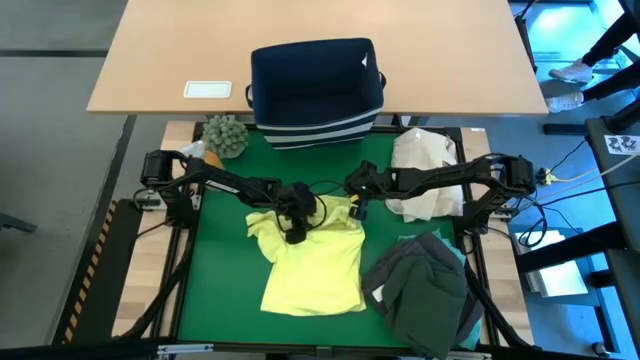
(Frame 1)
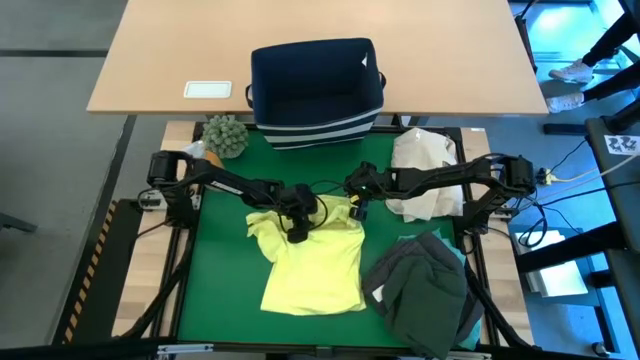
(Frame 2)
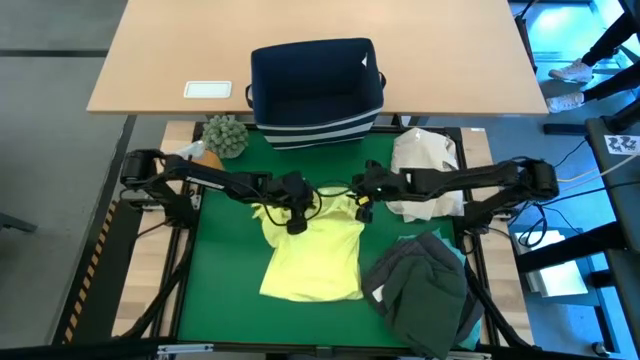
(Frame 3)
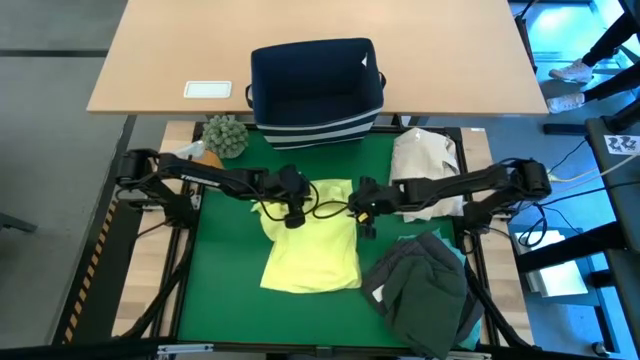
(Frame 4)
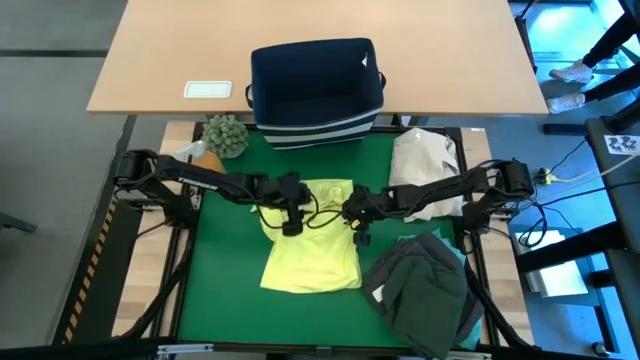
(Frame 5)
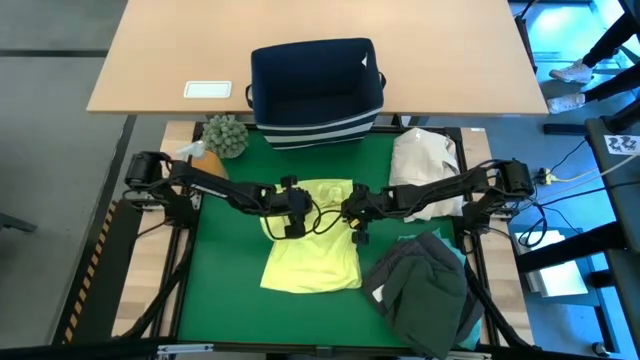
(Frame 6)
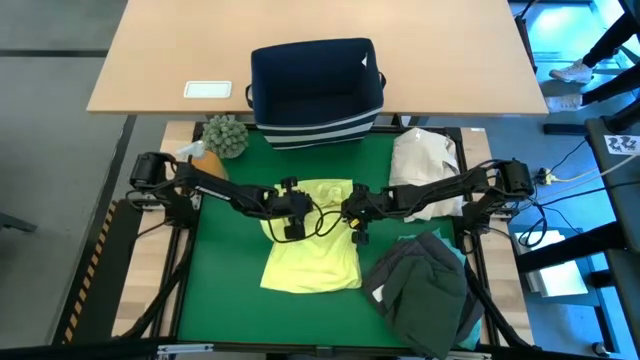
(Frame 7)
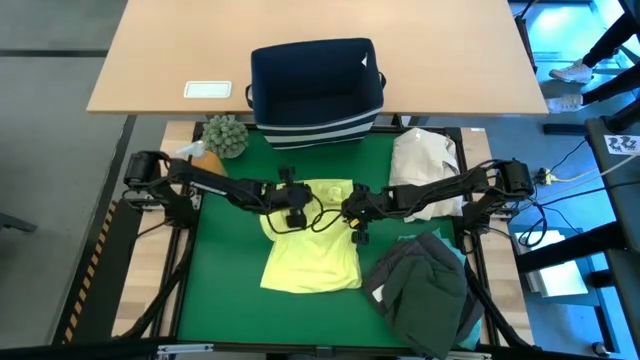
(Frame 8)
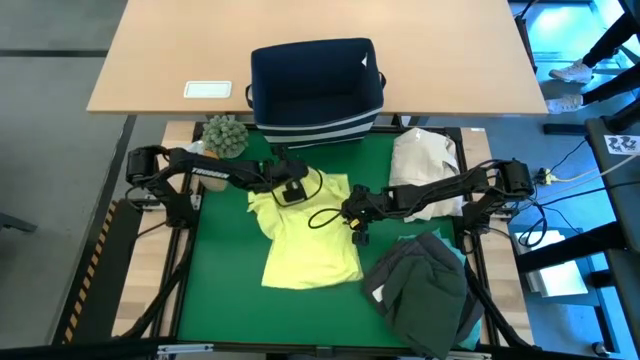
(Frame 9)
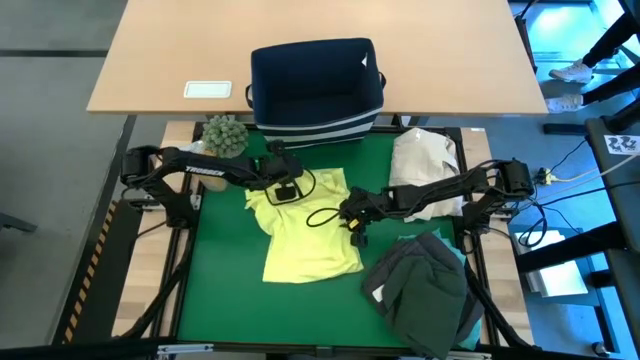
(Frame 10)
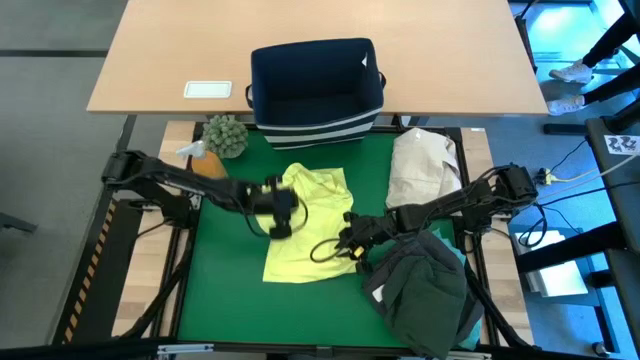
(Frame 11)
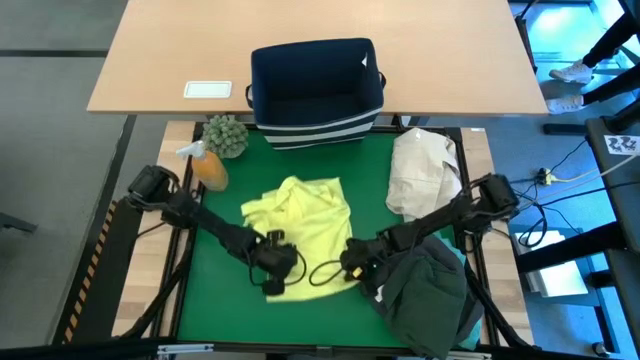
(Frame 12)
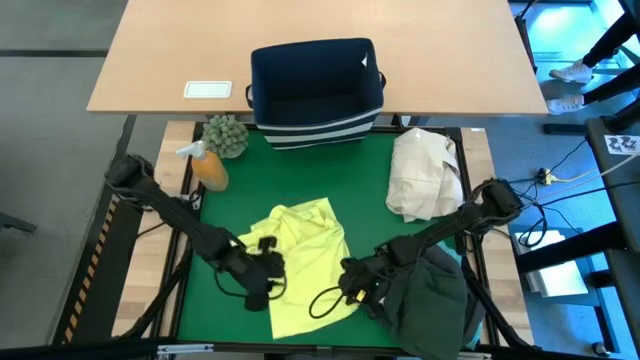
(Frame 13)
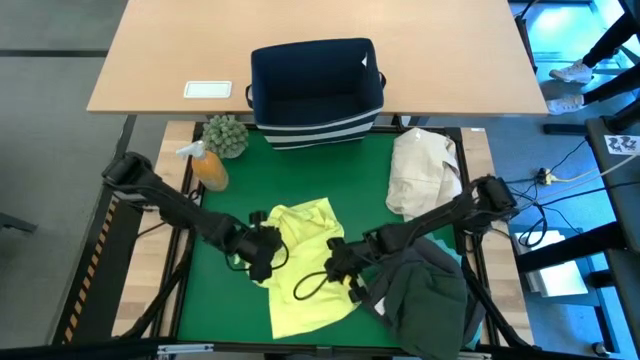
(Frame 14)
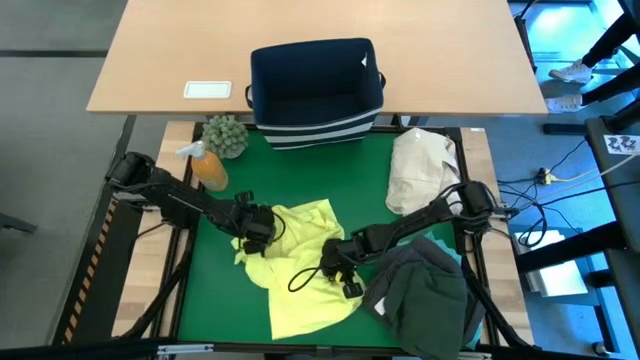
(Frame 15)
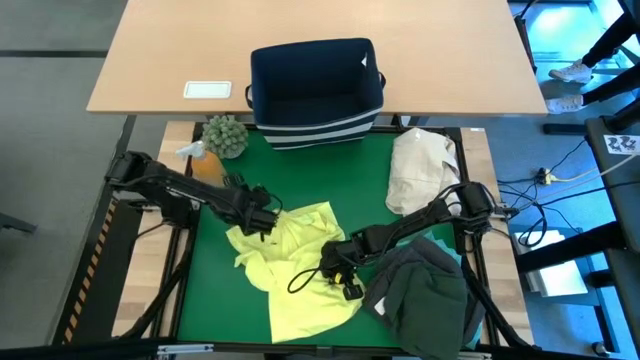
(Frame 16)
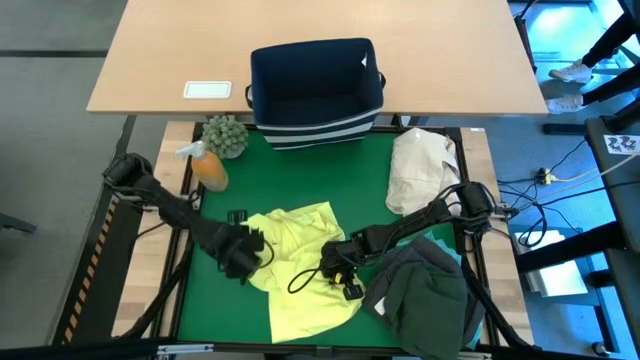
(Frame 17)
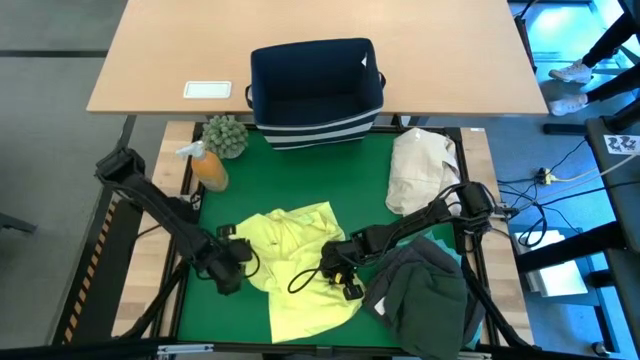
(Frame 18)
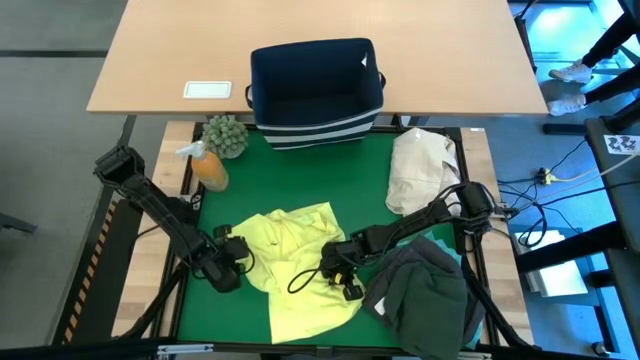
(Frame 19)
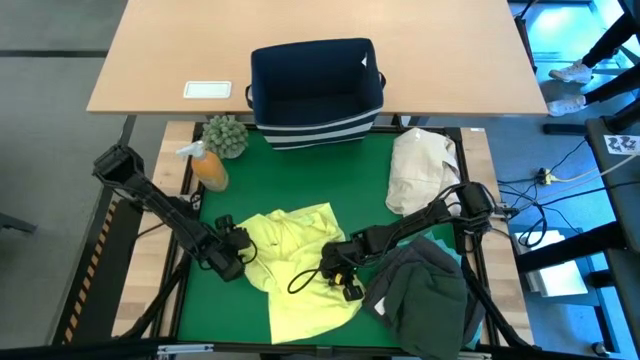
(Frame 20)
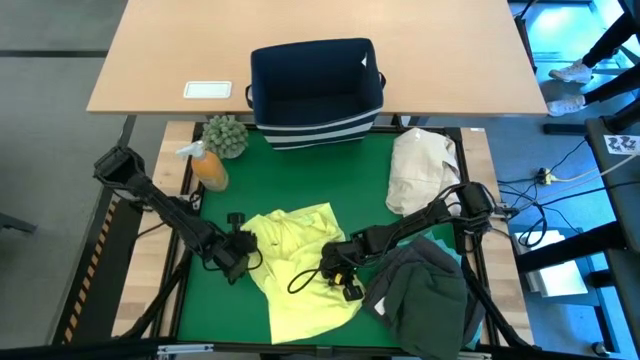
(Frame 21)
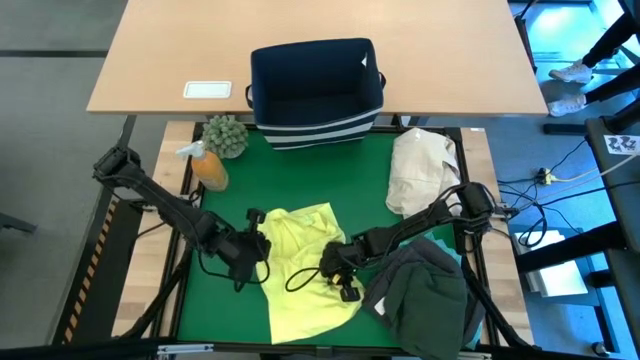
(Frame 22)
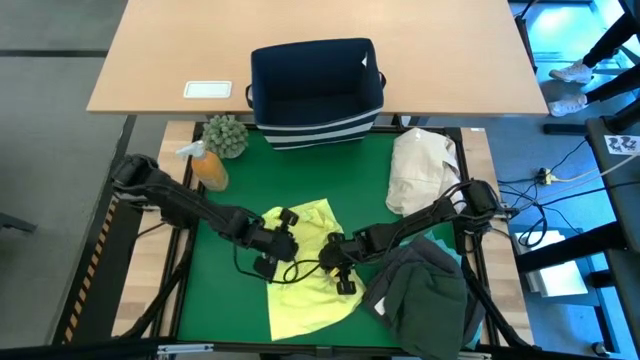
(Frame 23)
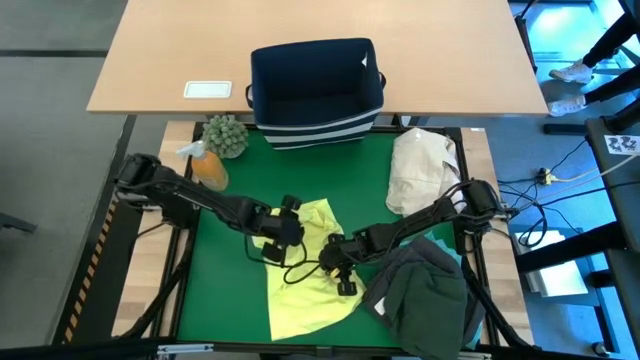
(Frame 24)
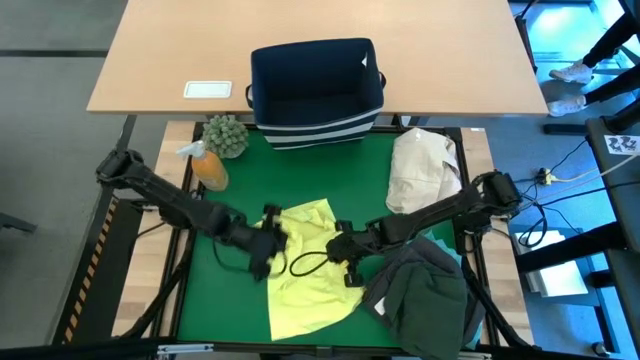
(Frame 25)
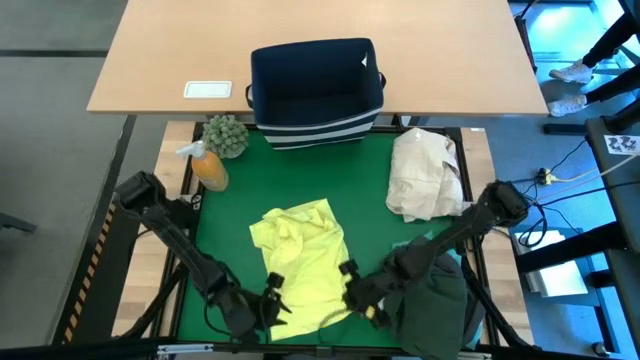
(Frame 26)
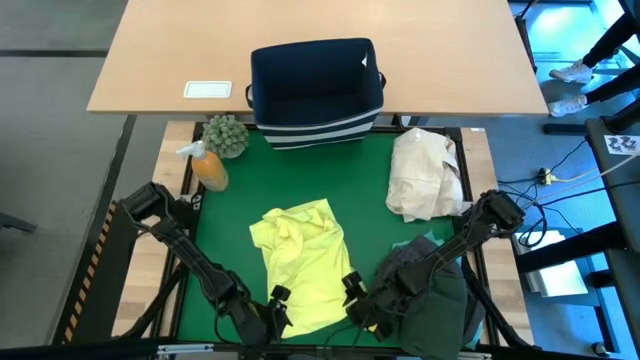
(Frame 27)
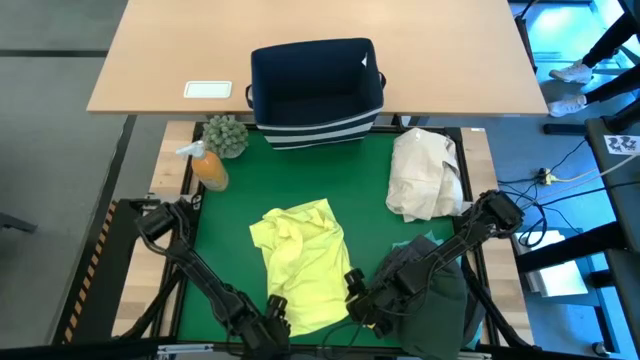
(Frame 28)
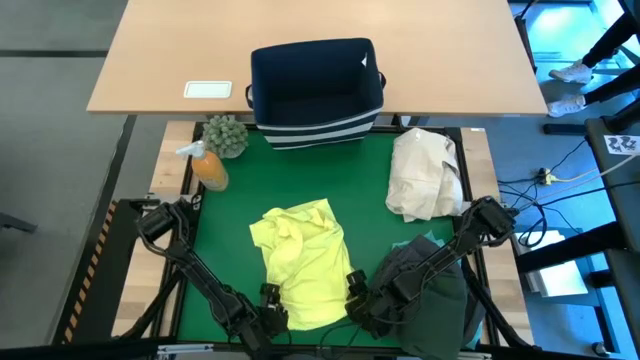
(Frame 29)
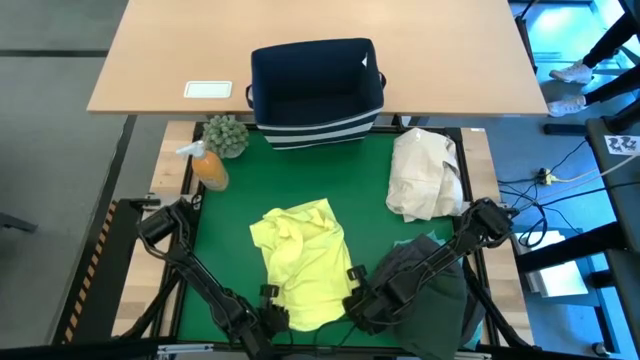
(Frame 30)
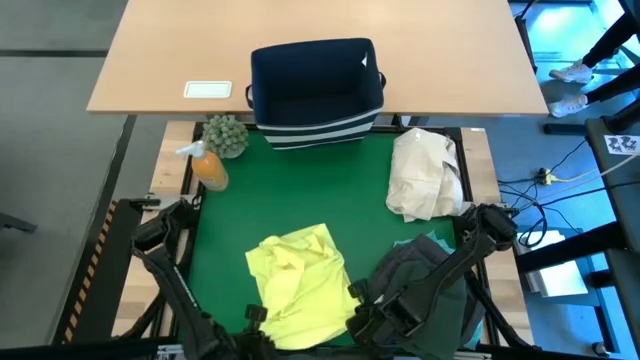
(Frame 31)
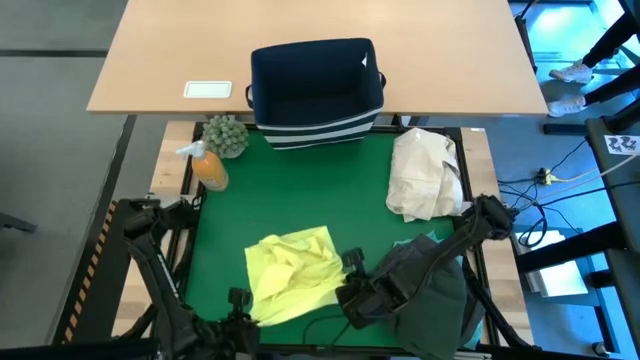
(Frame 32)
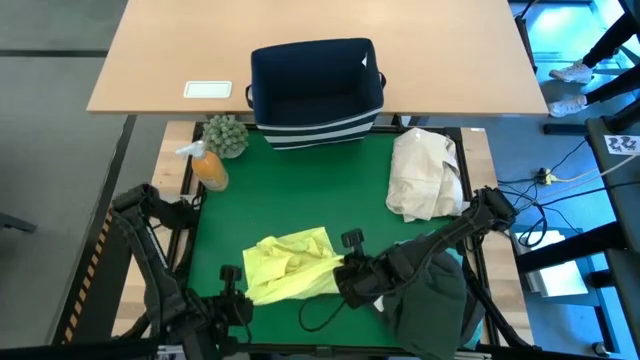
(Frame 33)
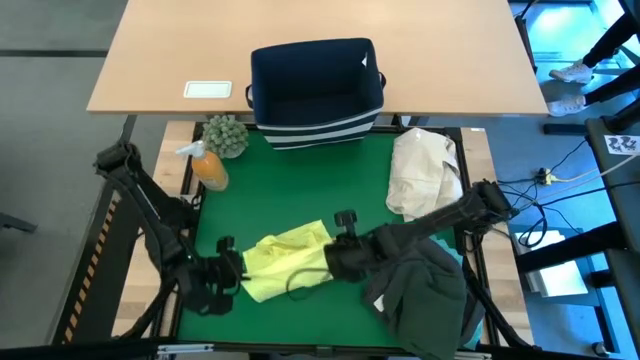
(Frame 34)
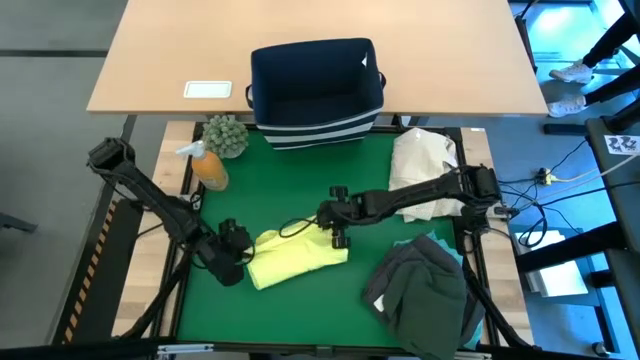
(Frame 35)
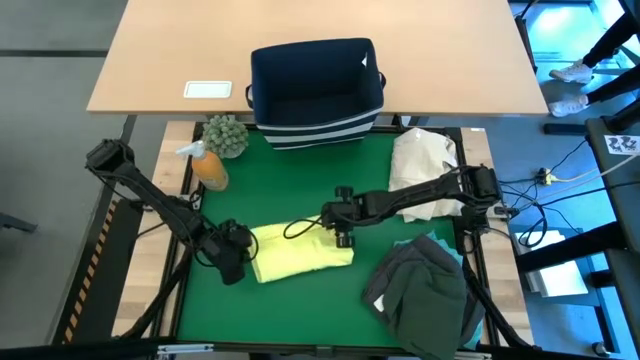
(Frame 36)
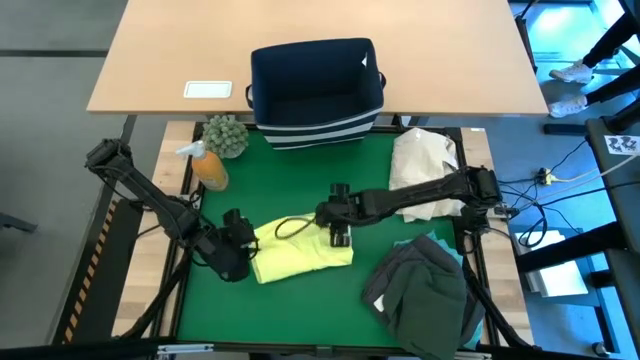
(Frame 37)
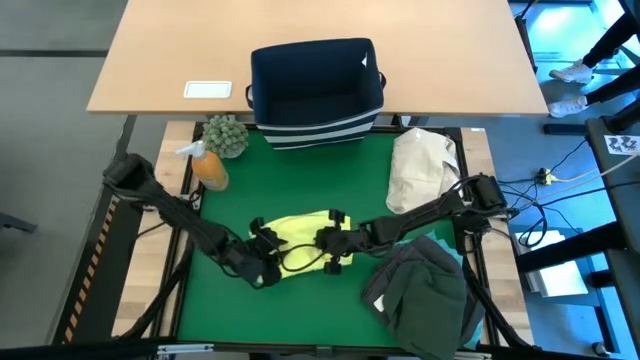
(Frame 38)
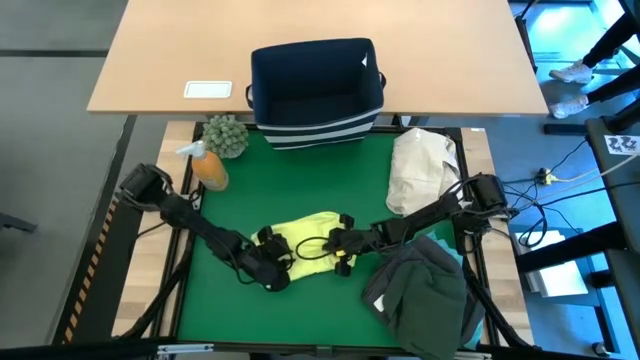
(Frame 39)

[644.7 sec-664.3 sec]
Task: Fold laundry
Fold the yellow shirt on the table
